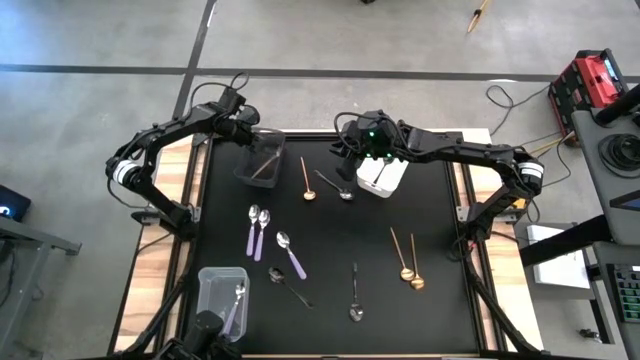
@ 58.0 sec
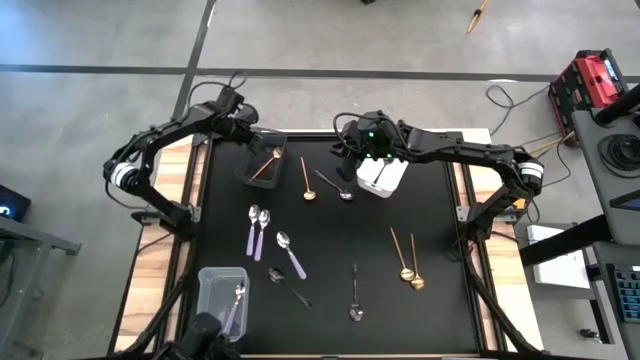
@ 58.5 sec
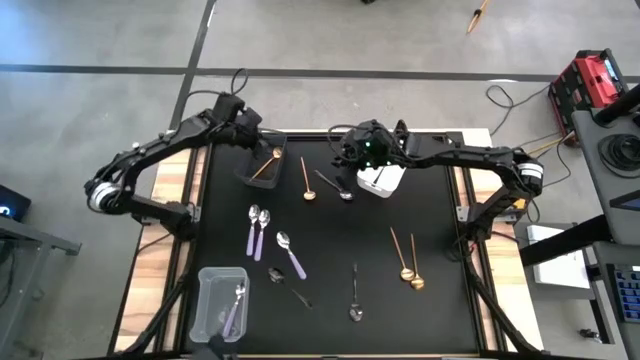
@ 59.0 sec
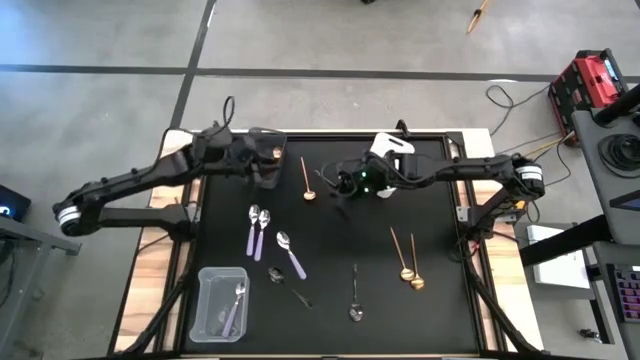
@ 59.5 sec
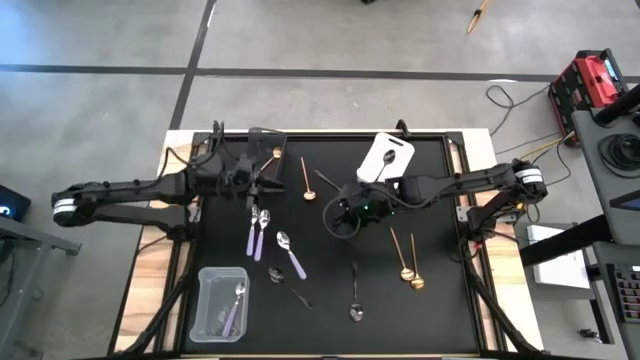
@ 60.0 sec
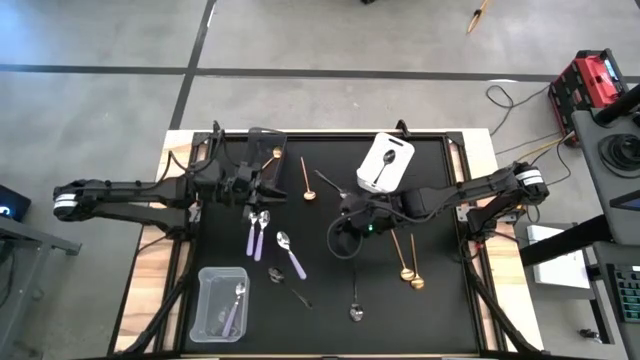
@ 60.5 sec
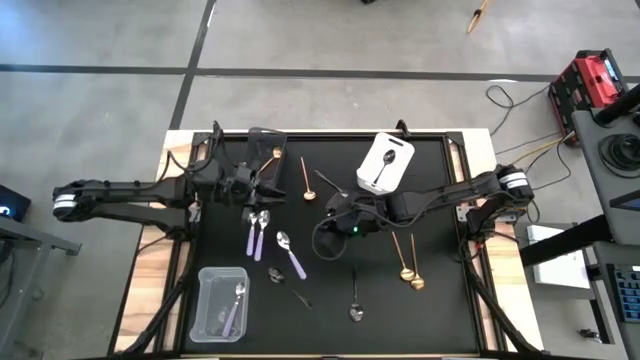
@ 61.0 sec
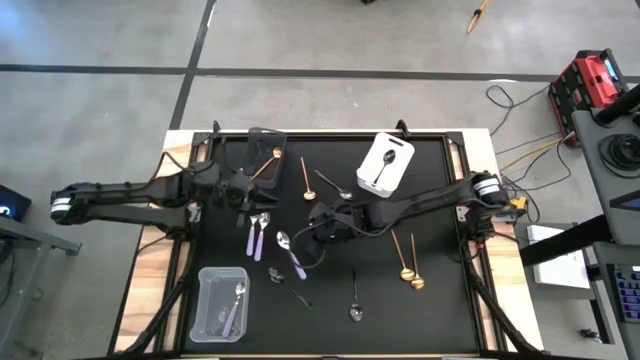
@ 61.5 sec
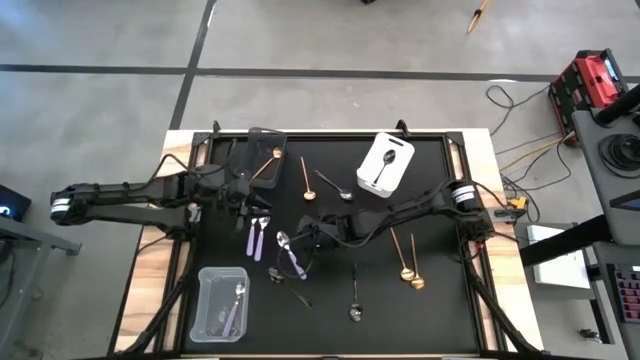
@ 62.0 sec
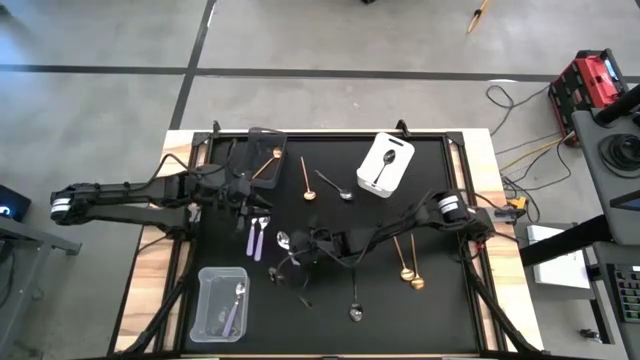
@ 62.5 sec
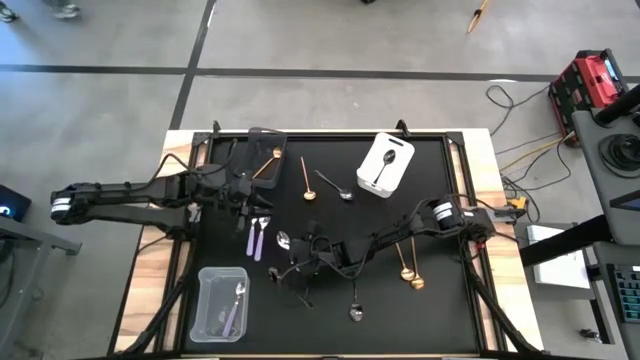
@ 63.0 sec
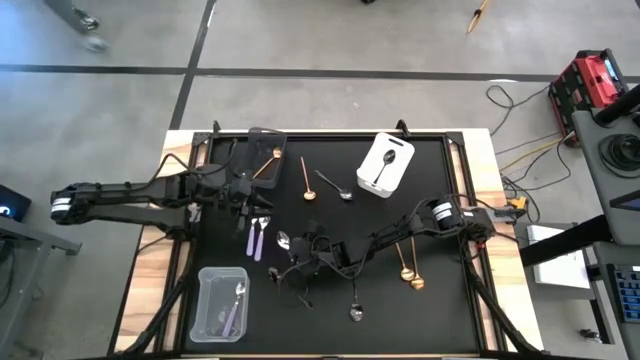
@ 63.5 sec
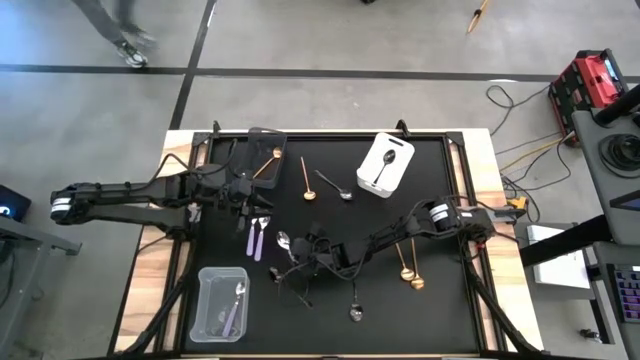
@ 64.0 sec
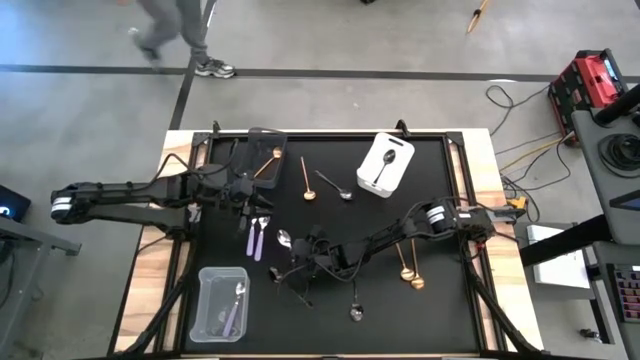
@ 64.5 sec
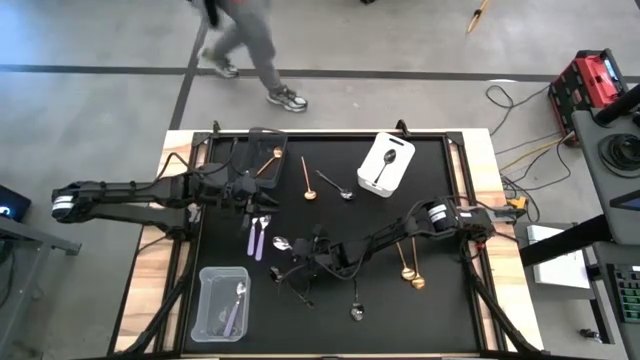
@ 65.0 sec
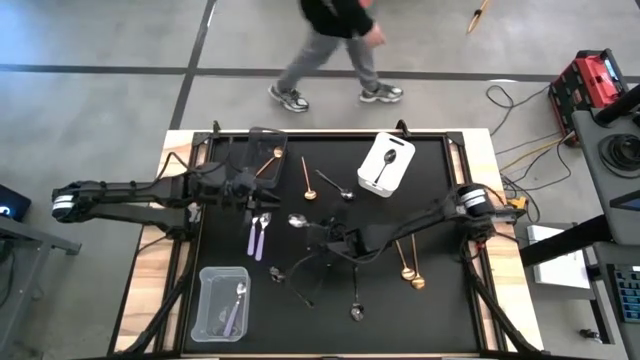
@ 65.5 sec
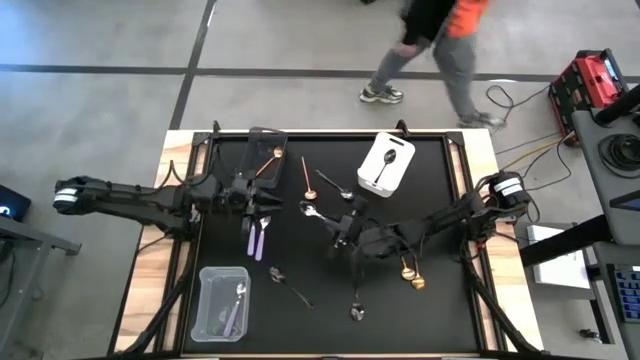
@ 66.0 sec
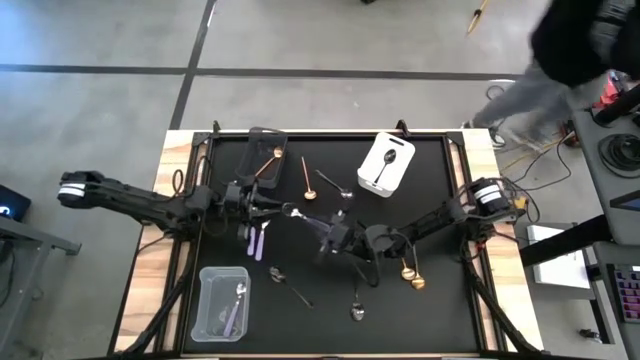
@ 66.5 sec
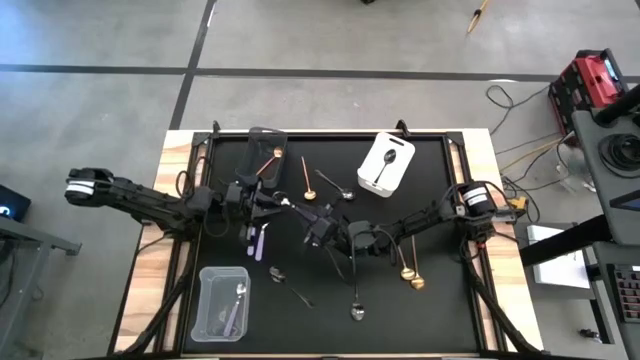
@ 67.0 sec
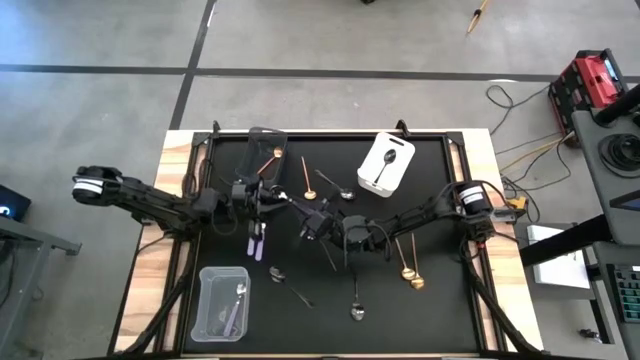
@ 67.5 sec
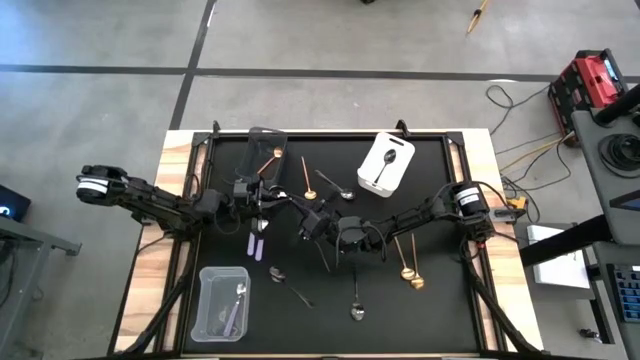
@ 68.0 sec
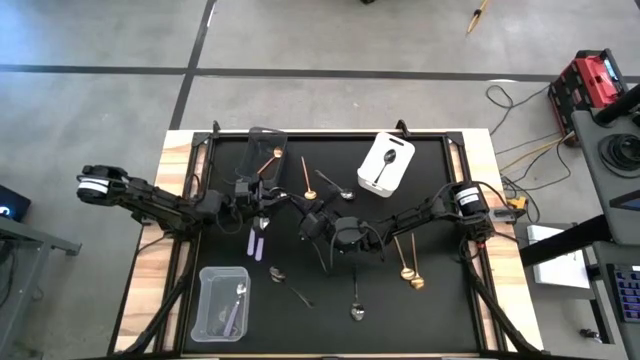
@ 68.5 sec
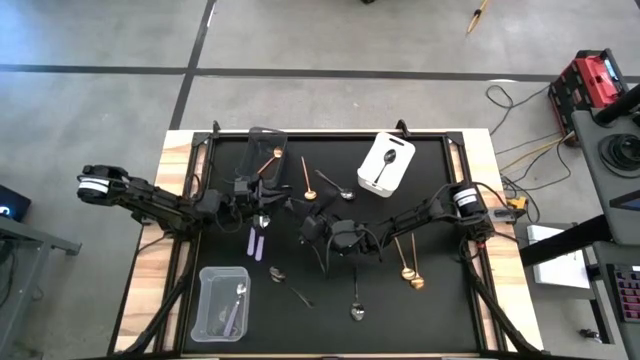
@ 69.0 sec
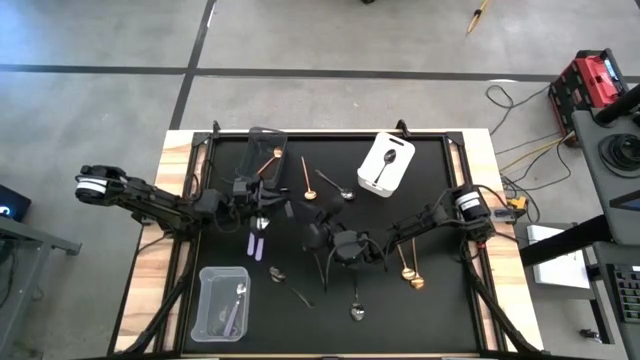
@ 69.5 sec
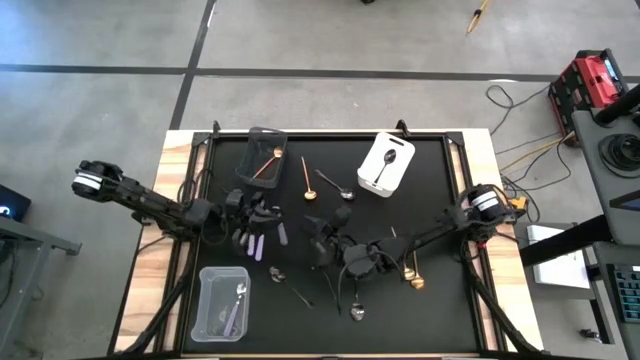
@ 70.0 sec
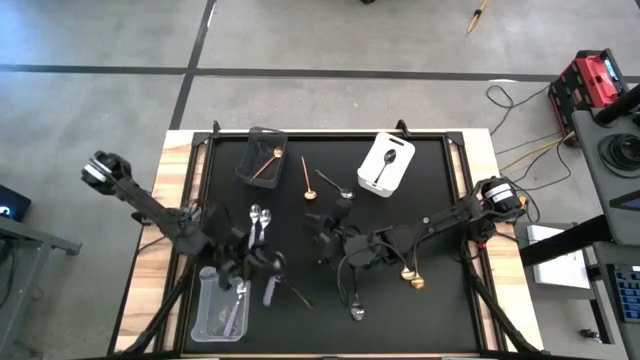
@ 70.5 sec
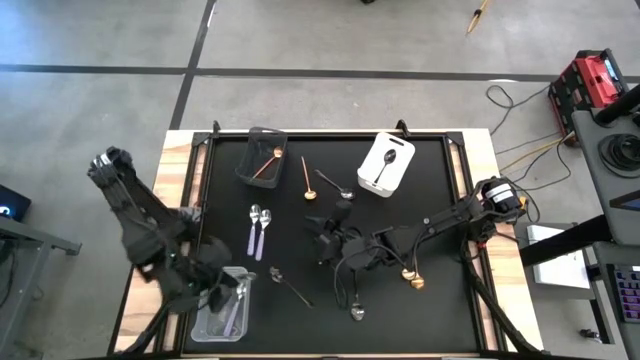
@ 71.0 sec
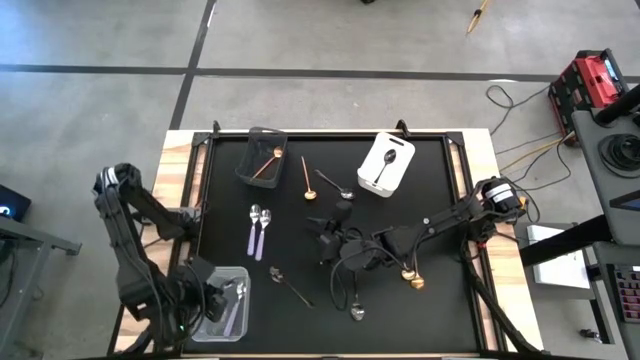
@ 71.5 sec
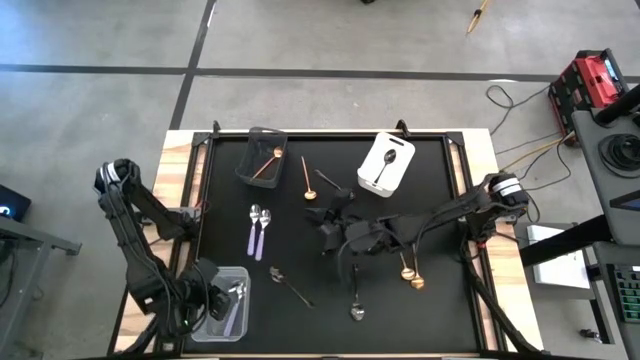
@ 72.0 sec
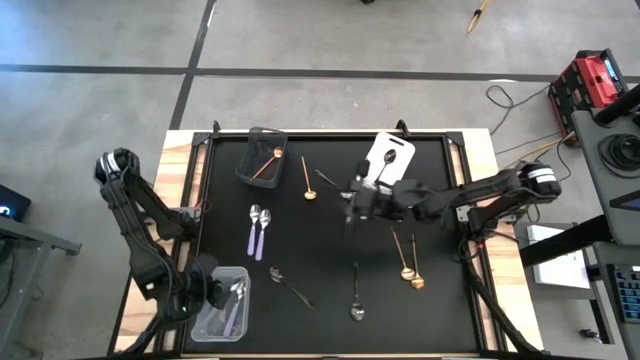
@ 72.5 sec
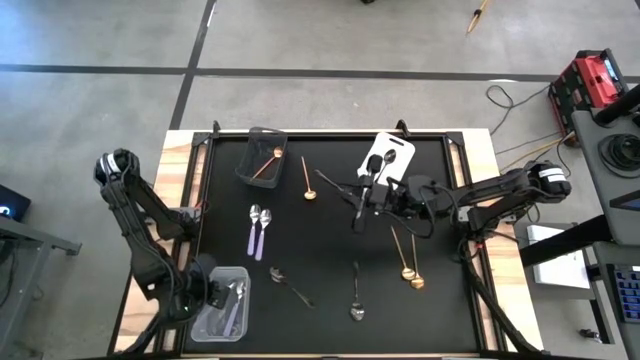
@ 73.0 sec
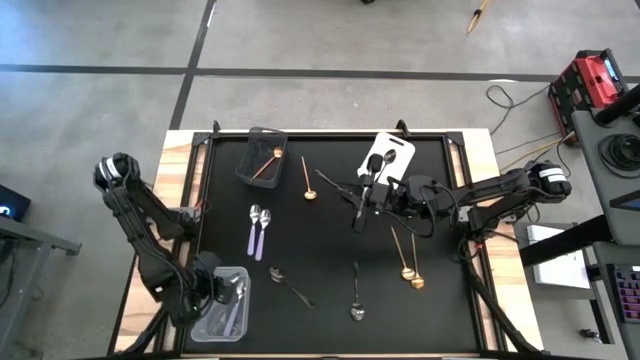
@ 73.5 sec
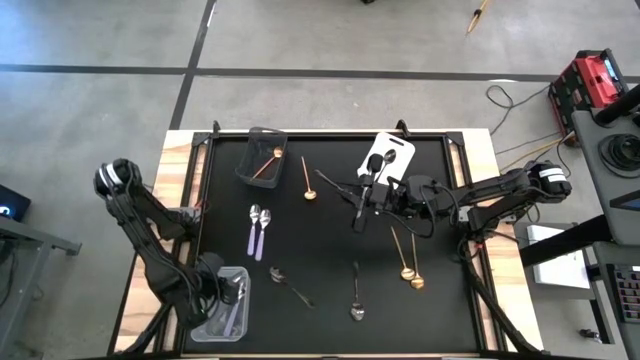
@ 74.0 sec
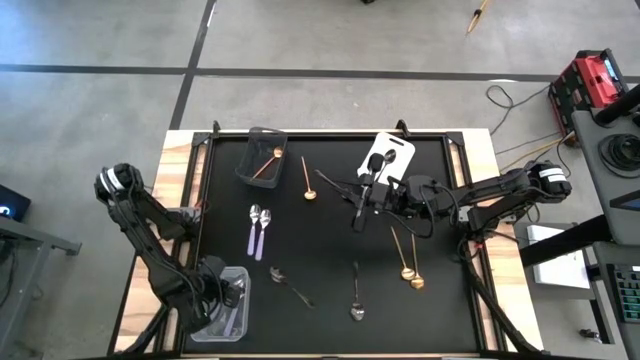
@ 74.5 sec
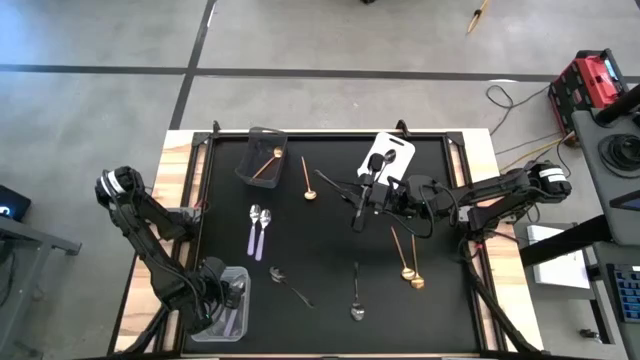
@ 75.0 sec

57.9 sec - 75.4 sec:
Task: Sort silverware by color (type)
Put the purple spoon into the transparent bin

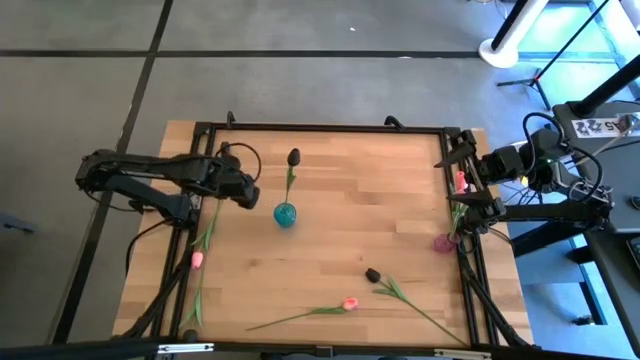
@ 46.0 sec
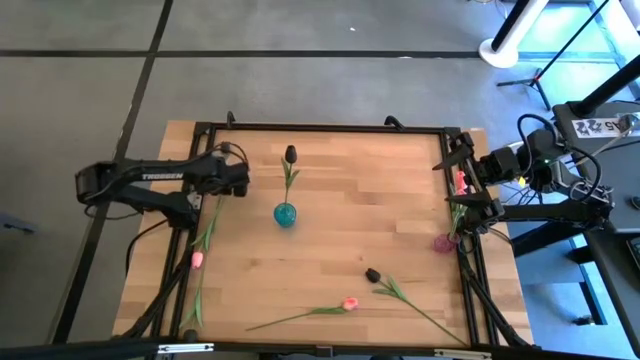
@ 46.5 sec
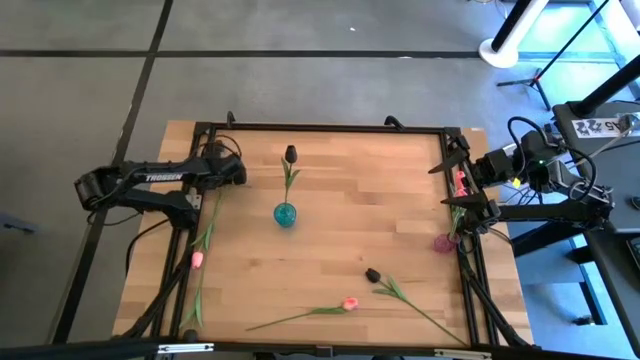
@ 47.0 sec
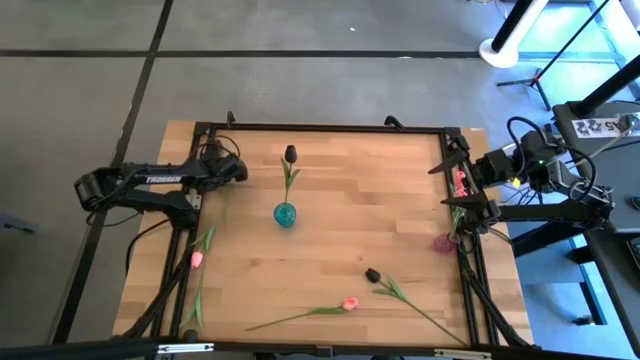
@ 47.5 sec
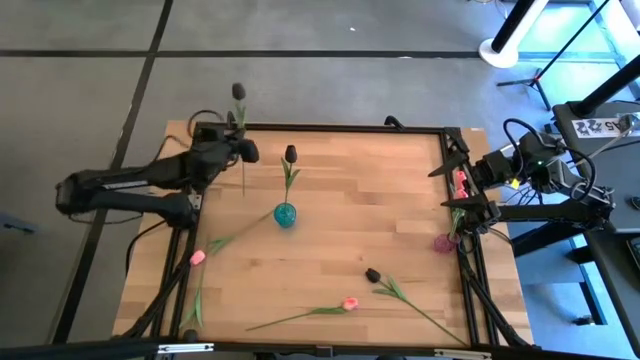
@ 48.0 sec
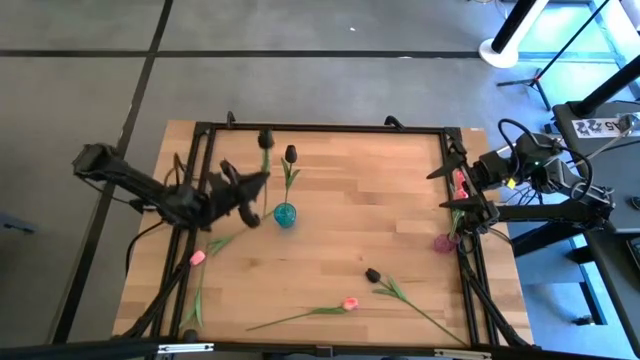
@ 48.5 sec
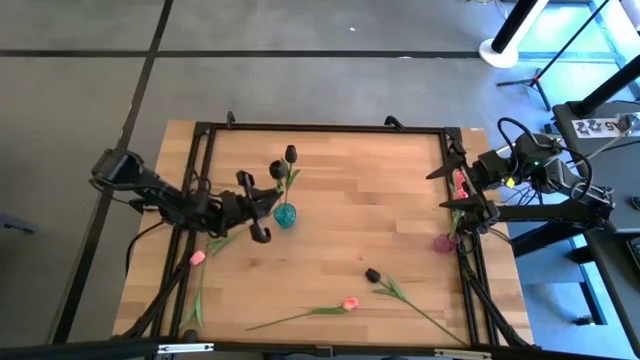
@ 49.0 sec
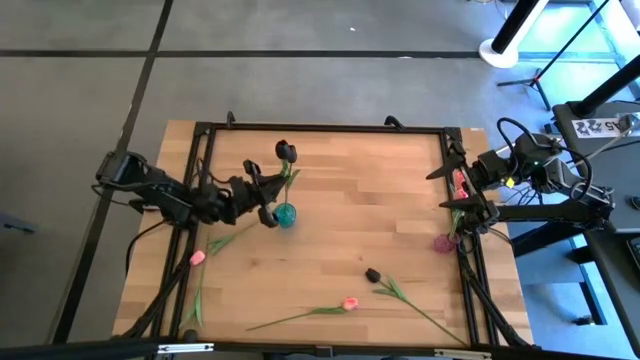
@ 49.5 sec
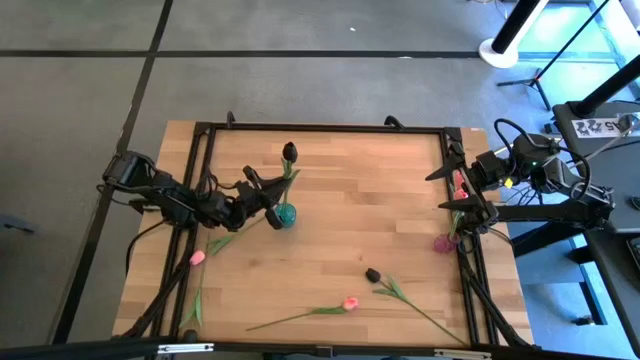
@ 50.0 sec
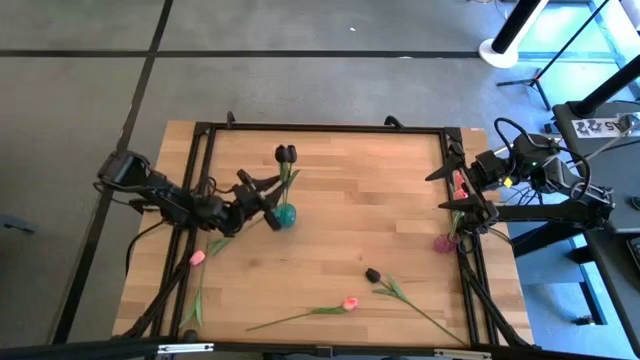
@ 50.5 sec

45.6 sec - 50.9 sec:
Task: Sort flowers into vase by color
Put the black tulip into the blue vase
